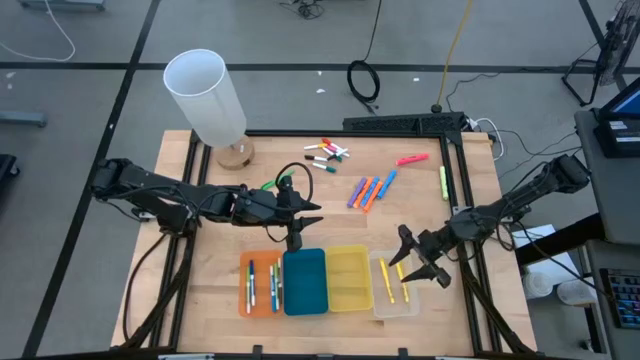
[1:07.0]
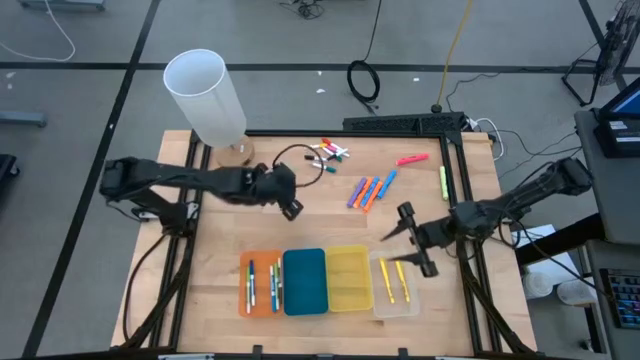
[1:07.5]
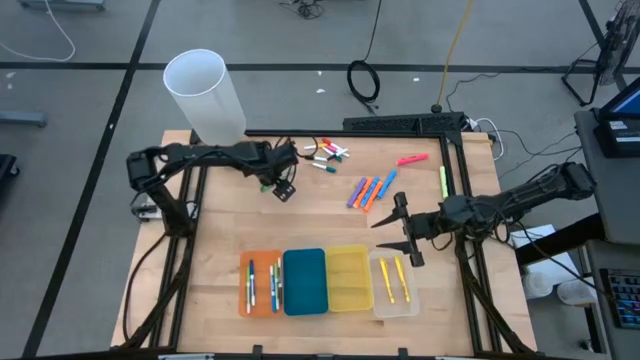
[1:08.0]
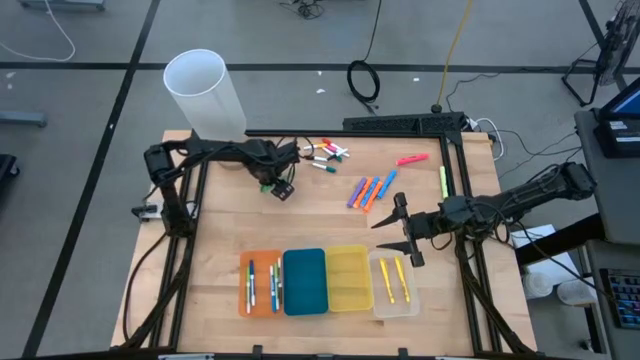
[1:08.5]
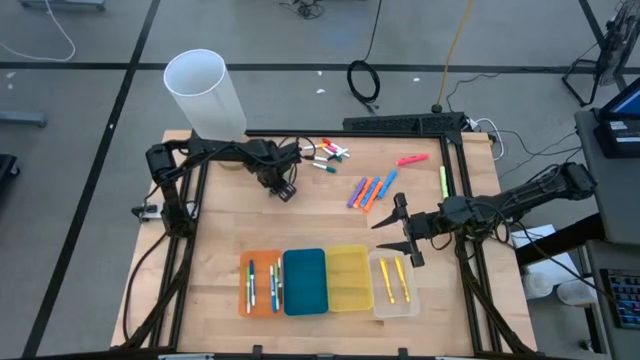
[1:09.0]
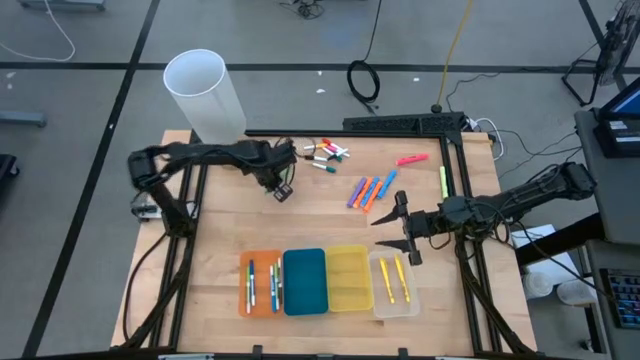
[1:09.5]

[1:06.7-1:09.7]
Task: Pick & Place Markers
Put the green pen into the transparent bin

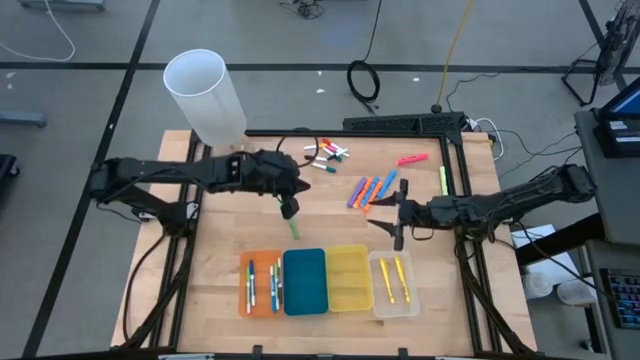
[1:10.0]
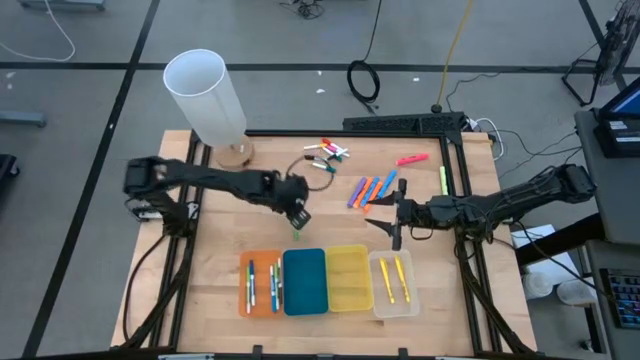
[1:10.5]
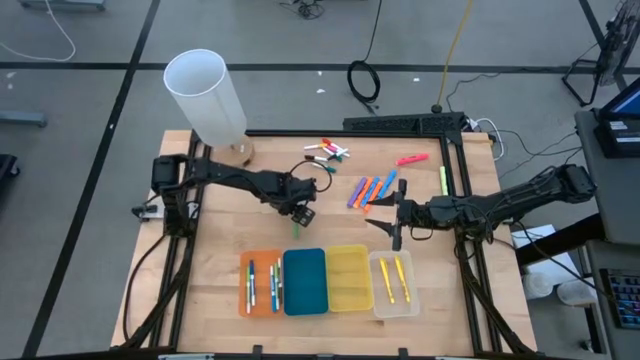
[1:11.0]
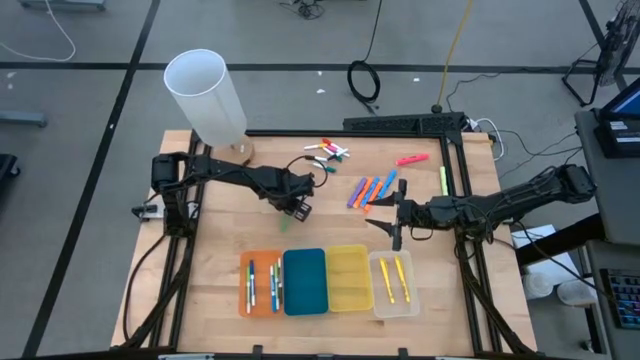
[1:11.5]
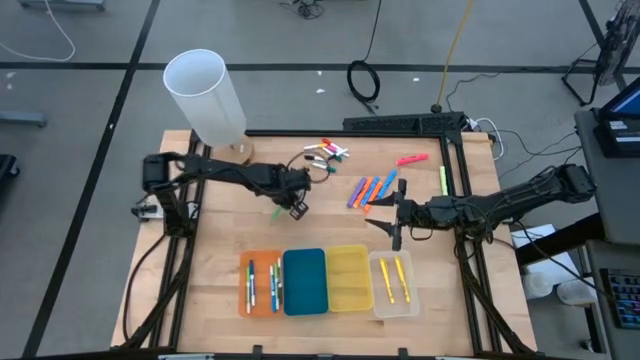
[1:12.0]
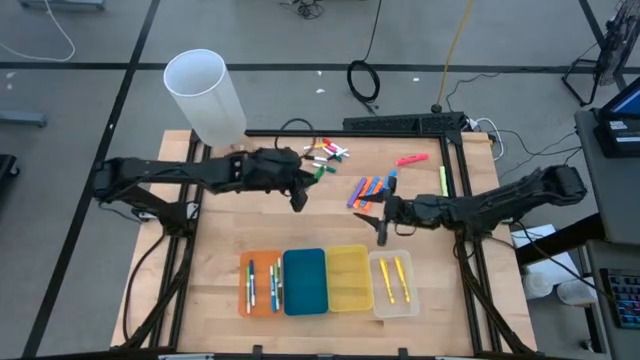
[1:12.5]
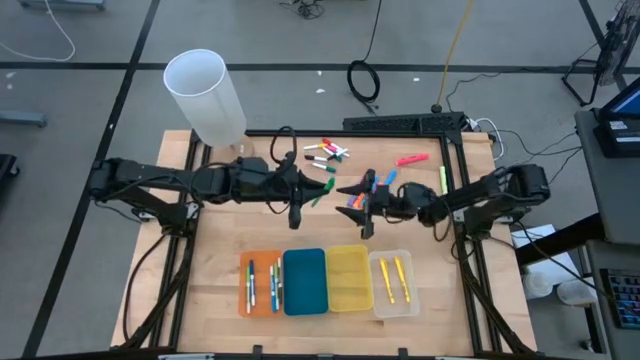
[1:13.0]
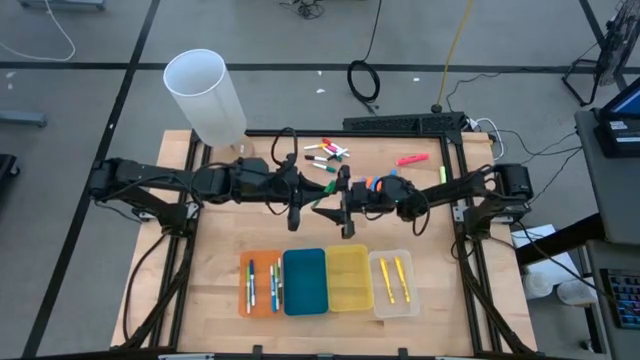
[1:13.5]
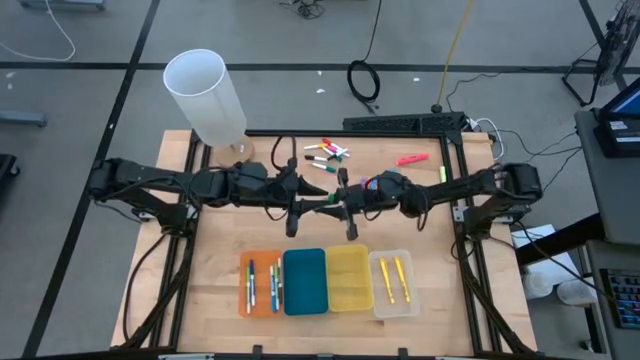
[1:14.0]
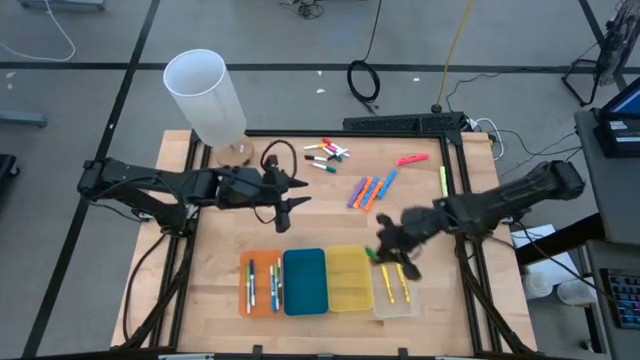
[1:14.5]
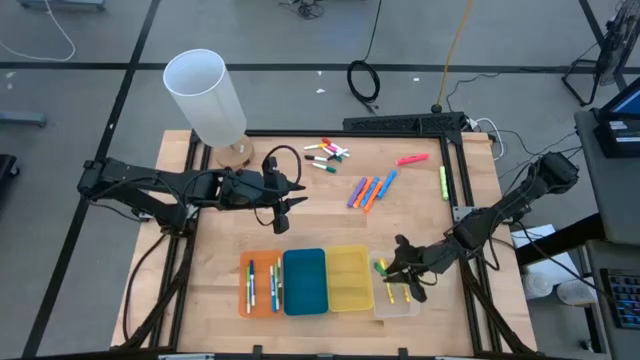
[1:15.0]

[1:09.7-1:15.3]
Put the green pen into the transparent bin

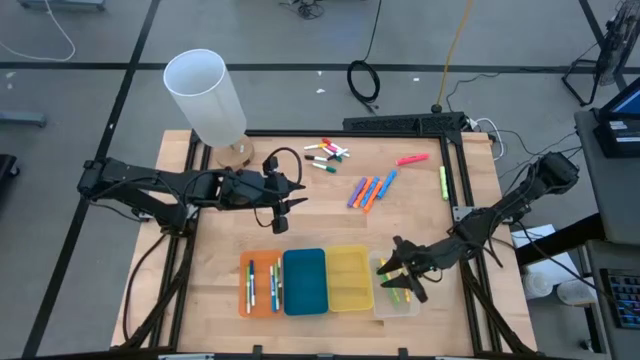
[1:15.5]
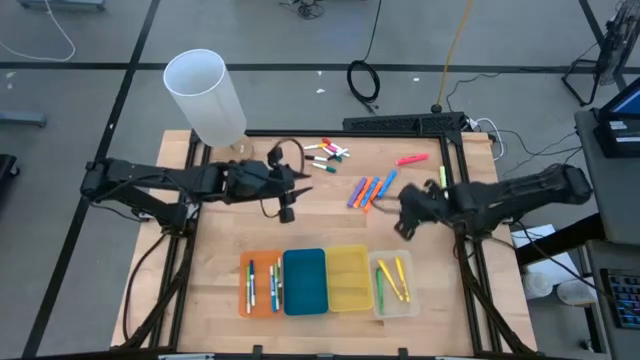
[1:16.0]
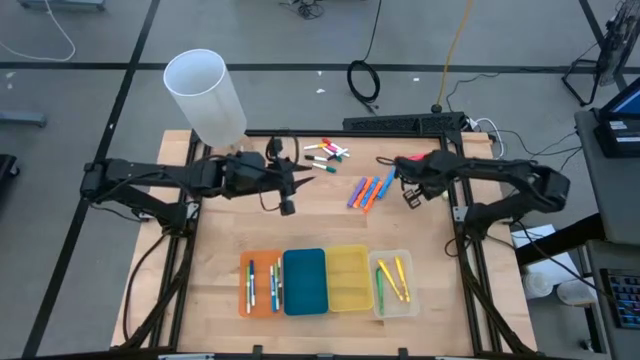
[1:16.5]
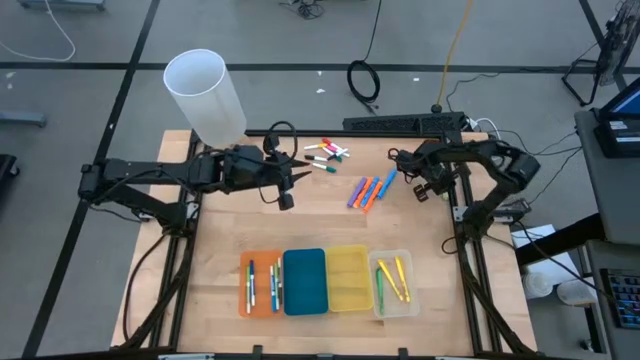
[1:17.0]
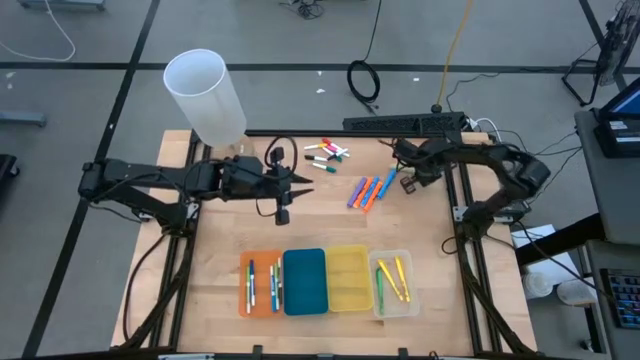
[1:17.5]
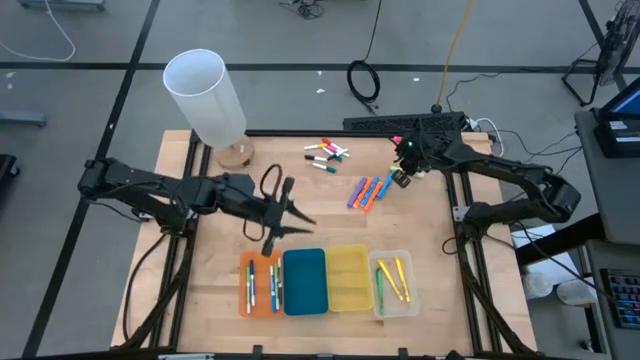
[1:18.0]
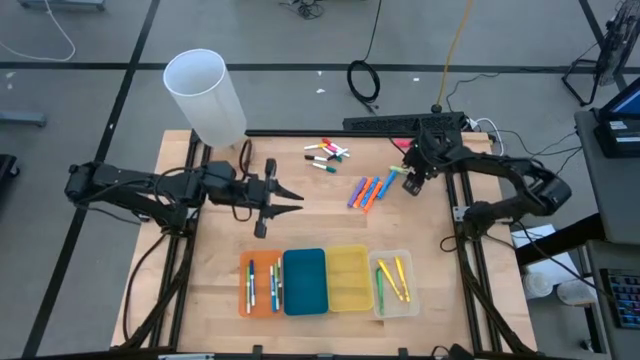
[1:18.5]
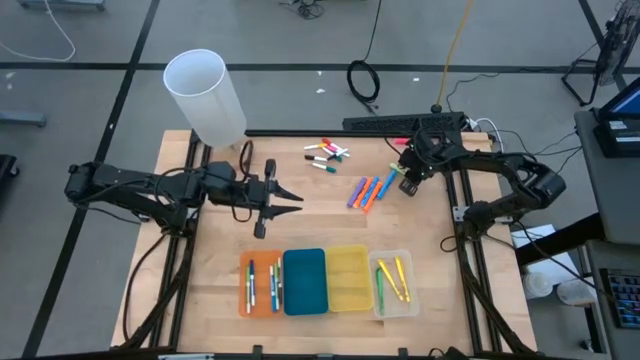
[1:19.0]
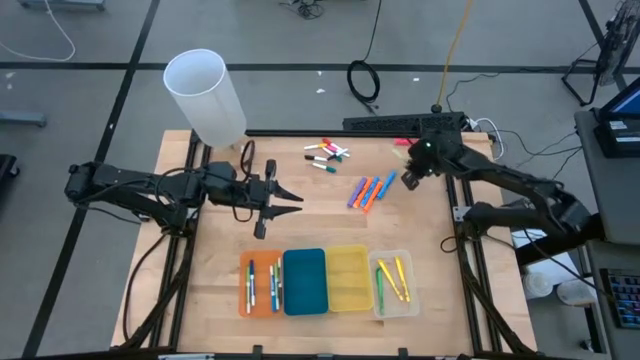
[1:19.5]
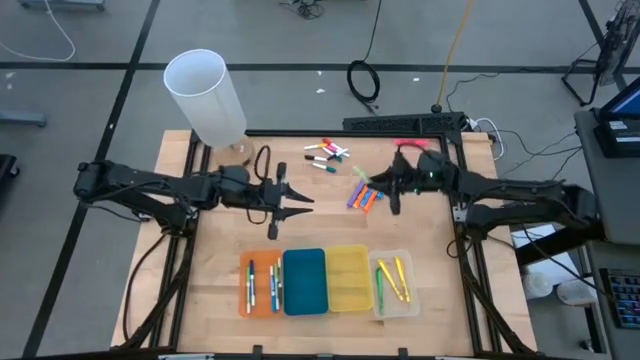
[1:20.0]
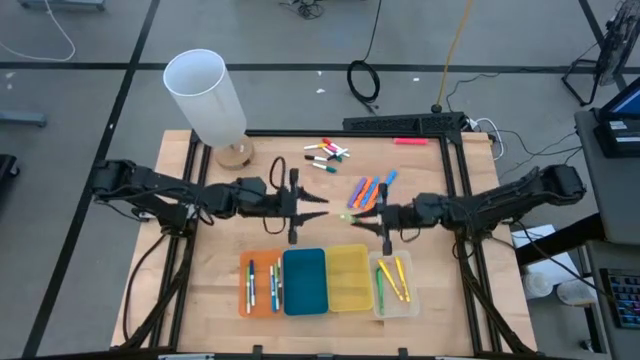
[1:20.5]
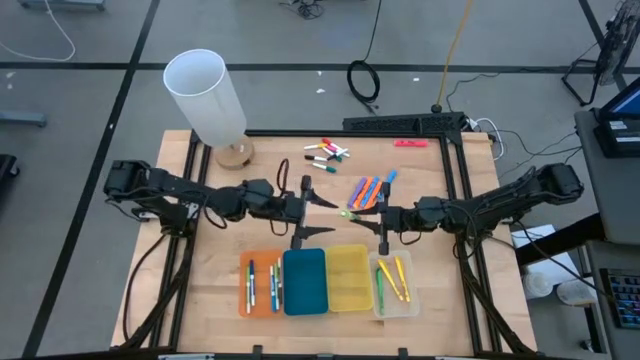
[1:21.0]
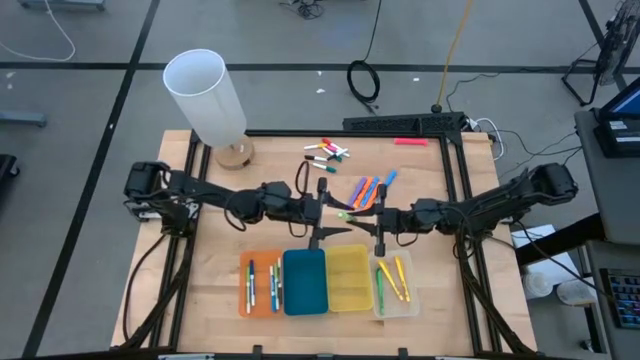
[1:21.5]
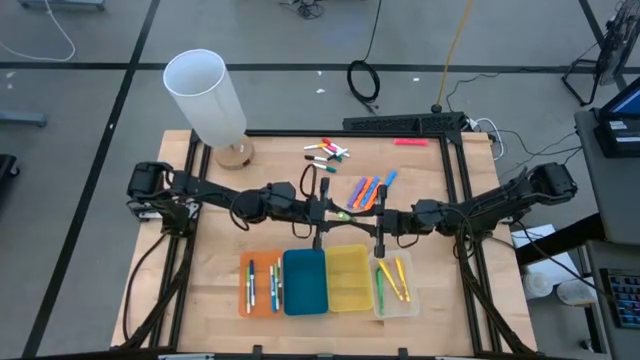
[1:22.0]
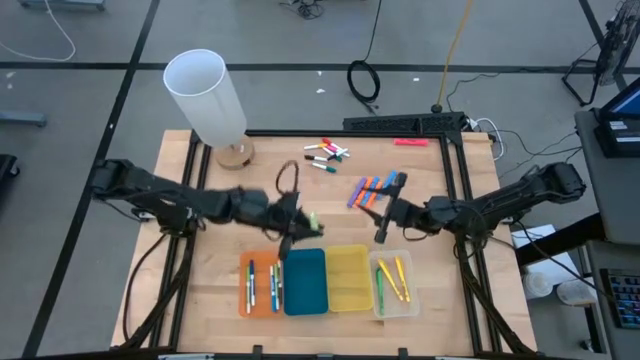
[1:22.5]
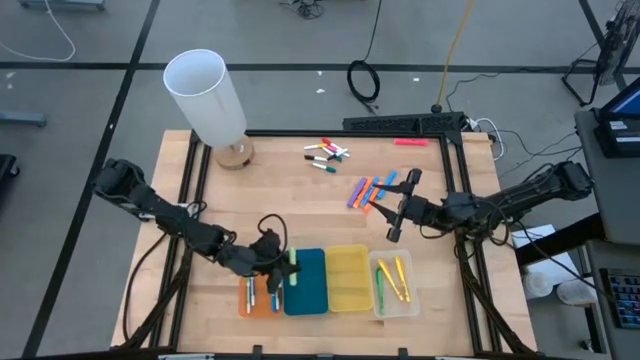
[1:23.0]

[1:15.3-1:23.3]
Put the light green highlighter pen into the blue bin

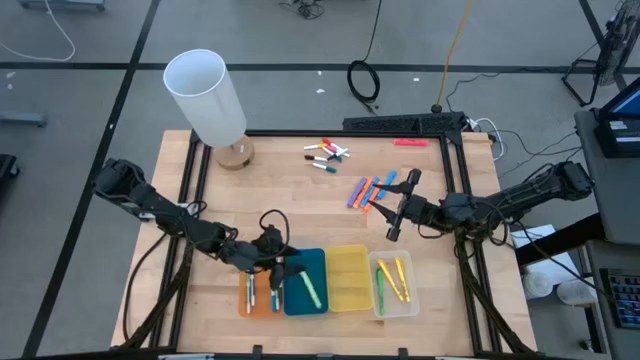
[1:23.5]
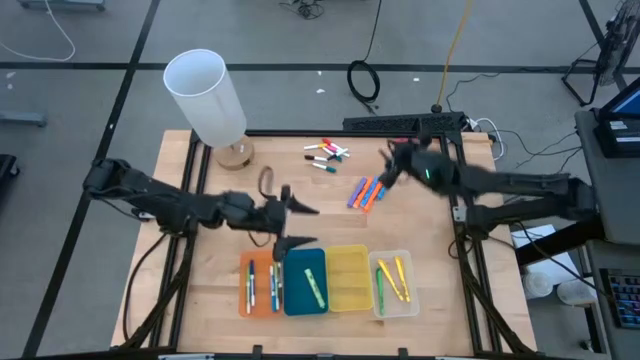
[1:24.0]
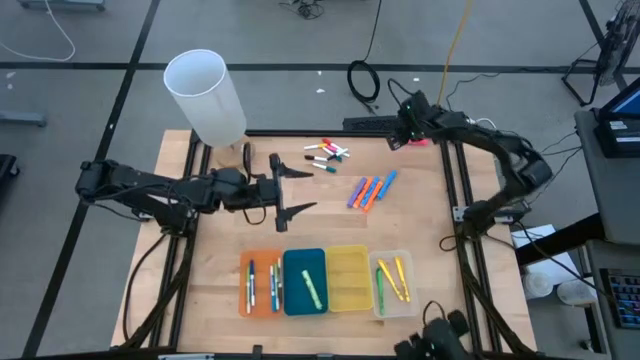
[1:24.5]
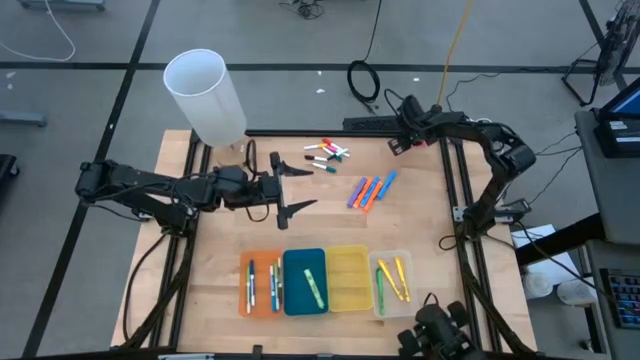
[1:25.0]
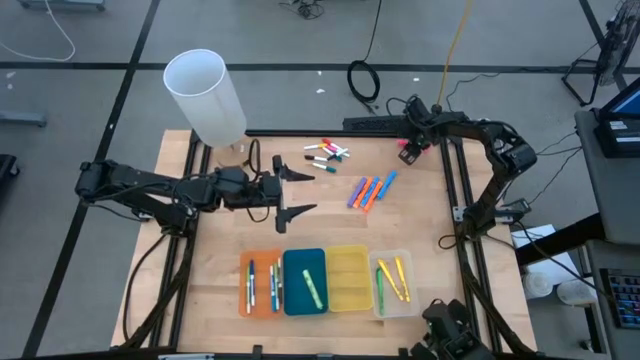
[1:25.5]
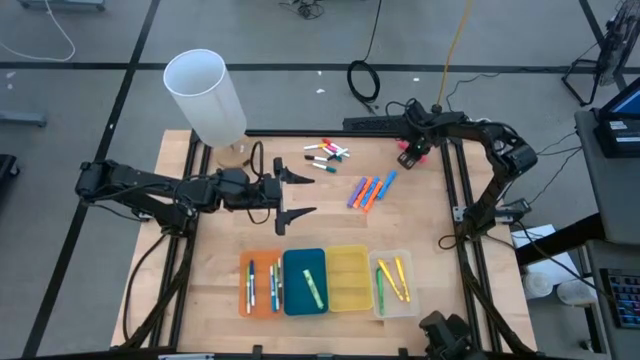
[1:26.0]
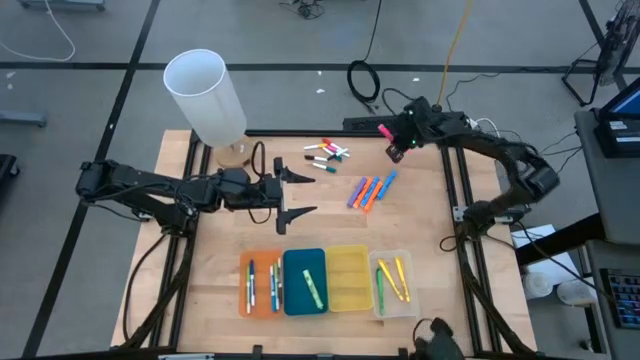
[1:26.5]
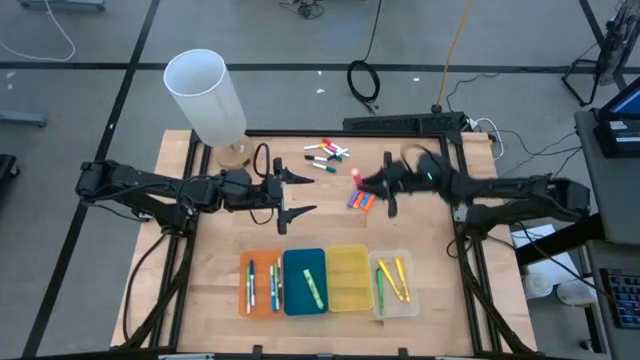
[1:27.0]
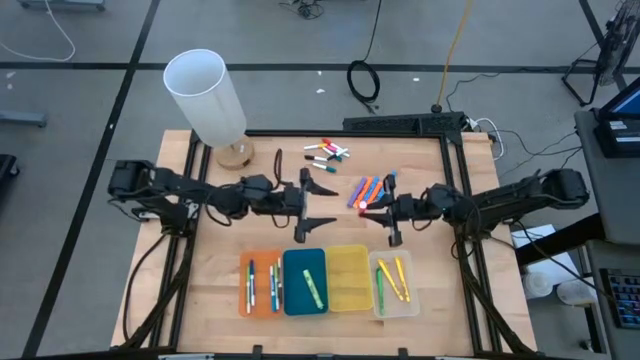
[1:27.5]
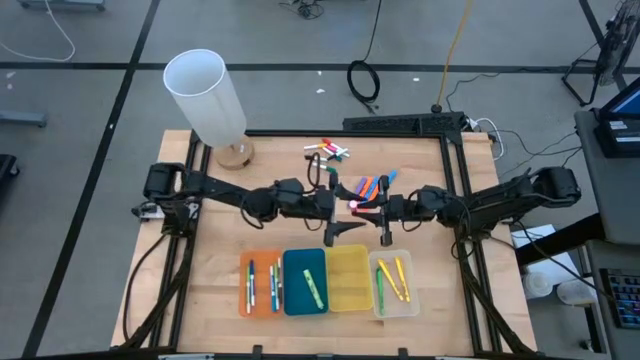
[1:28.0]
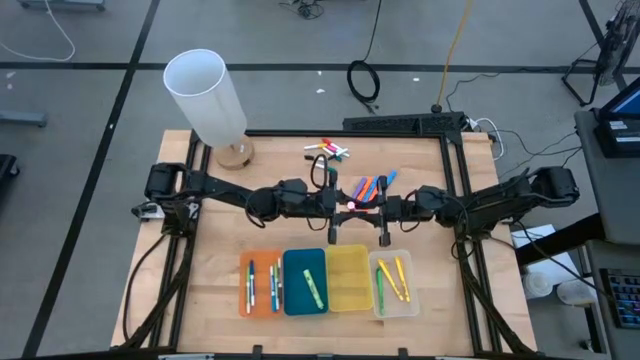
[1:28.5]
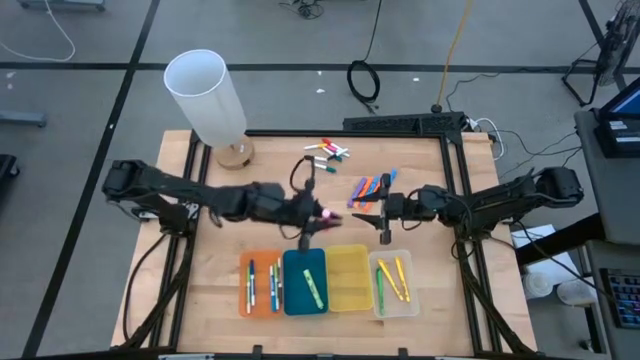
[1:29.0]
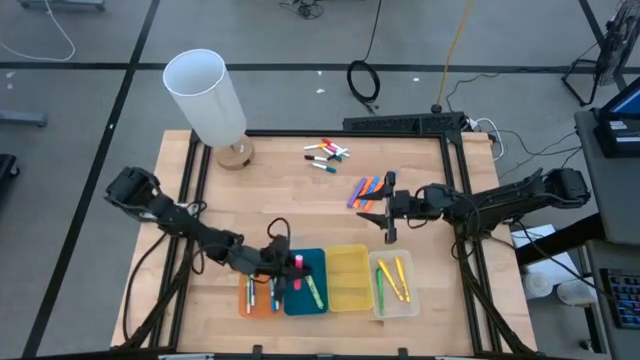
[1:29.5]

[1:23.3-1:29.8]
Put the pink highlighter pen into the blue bin
